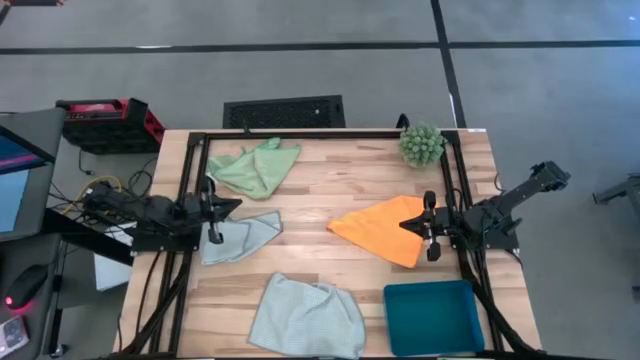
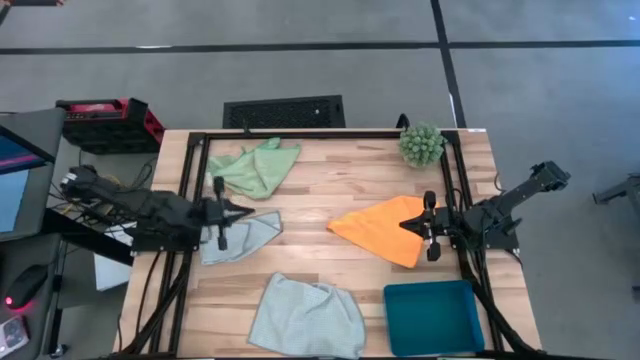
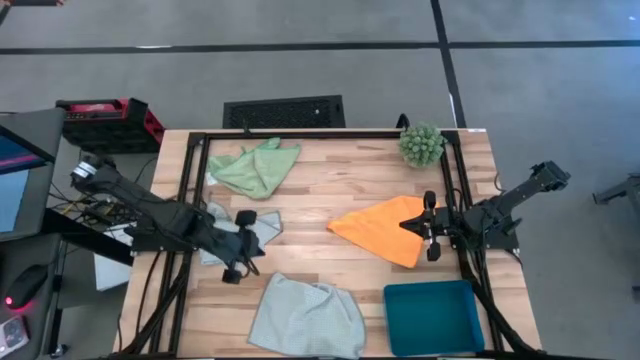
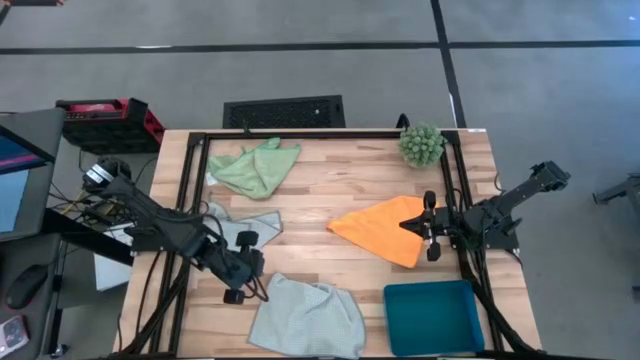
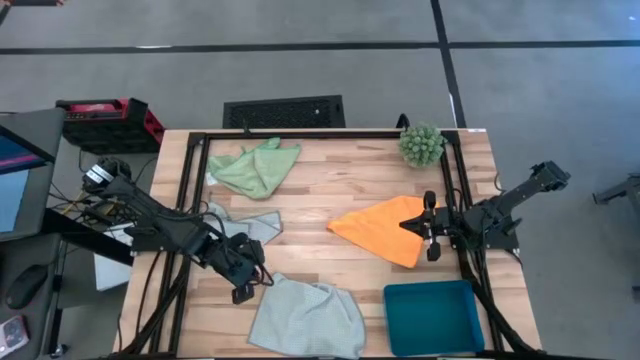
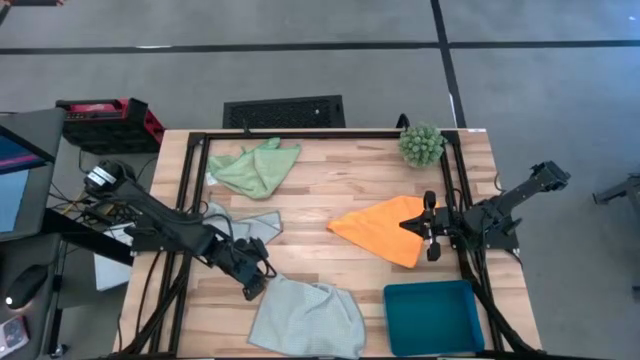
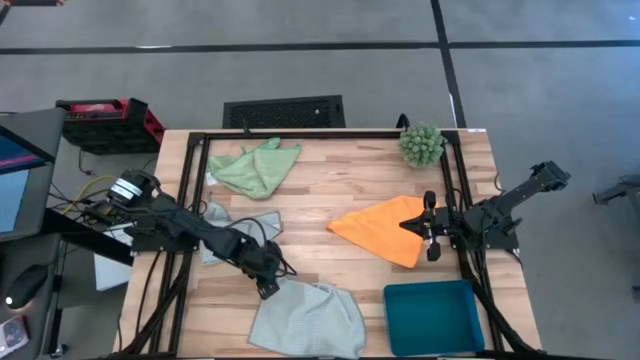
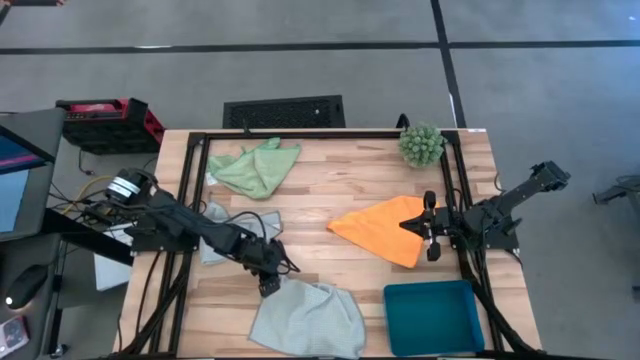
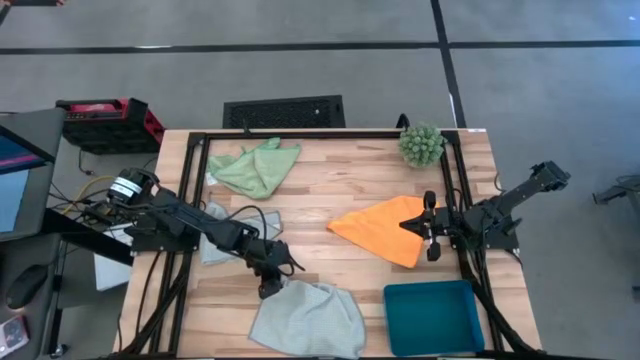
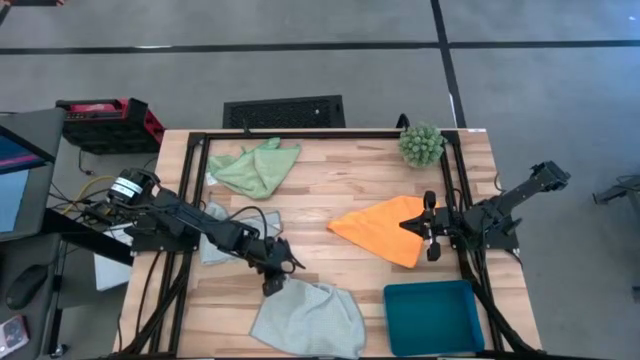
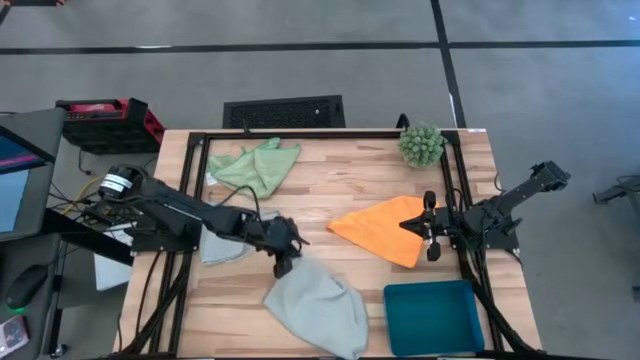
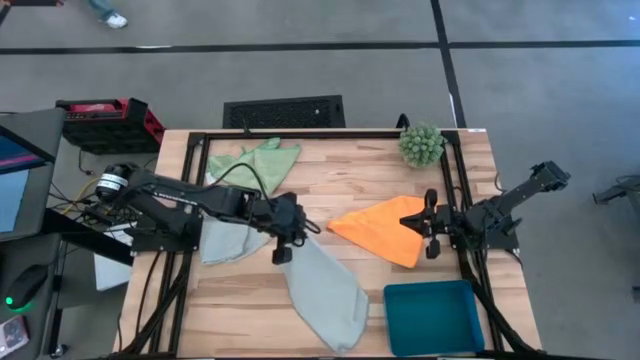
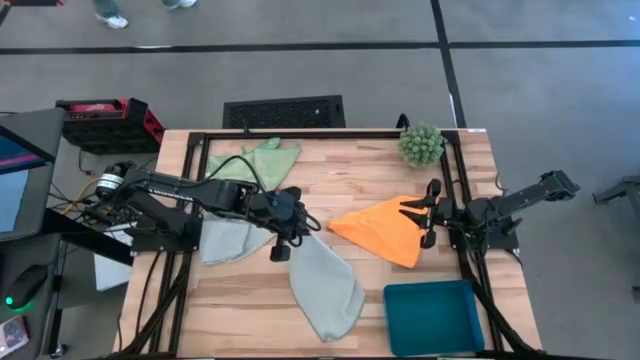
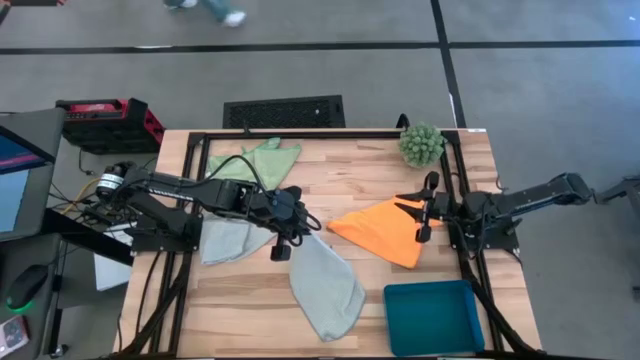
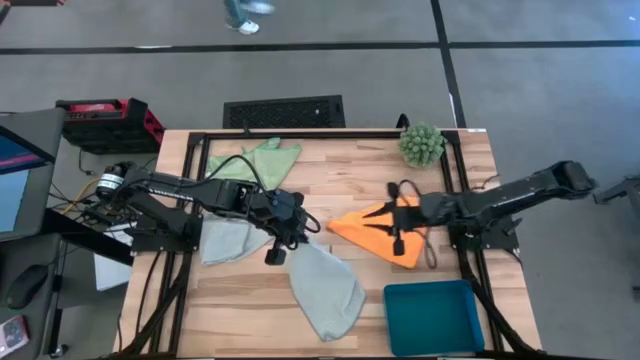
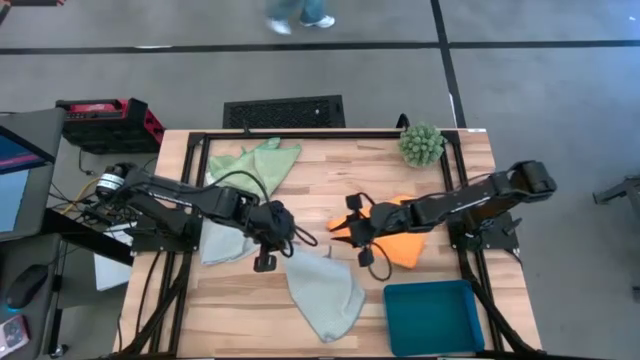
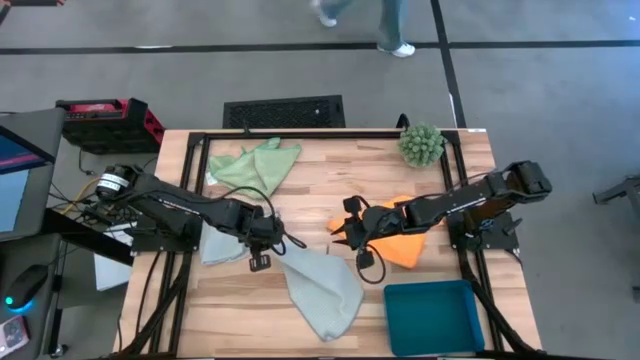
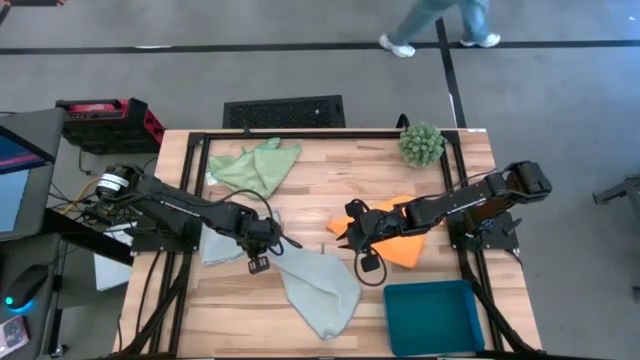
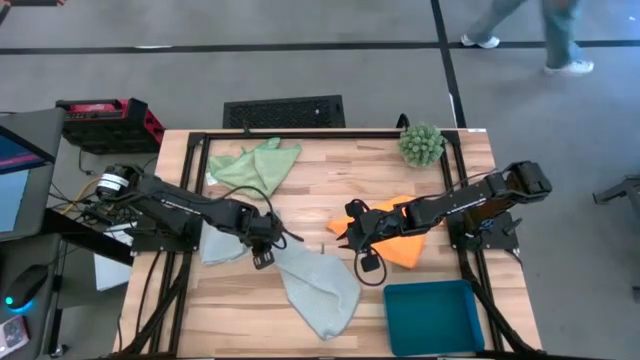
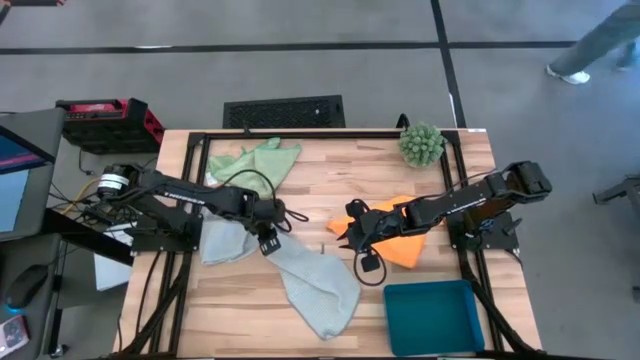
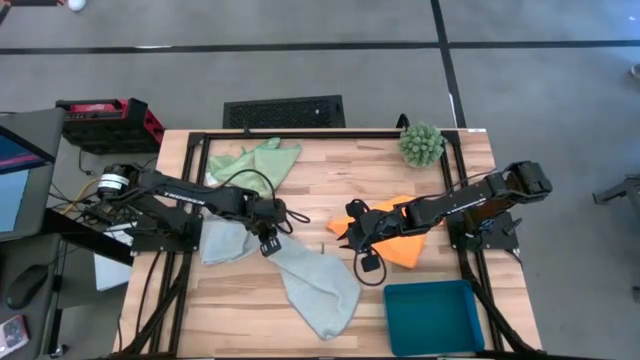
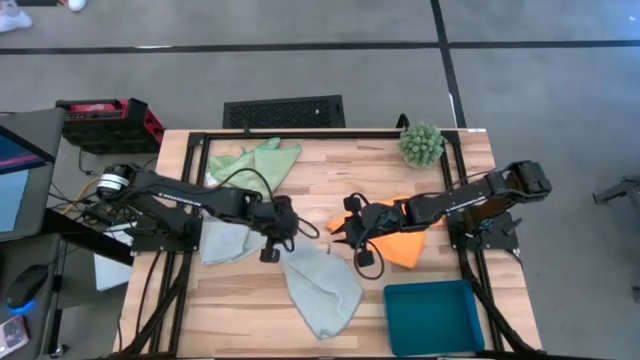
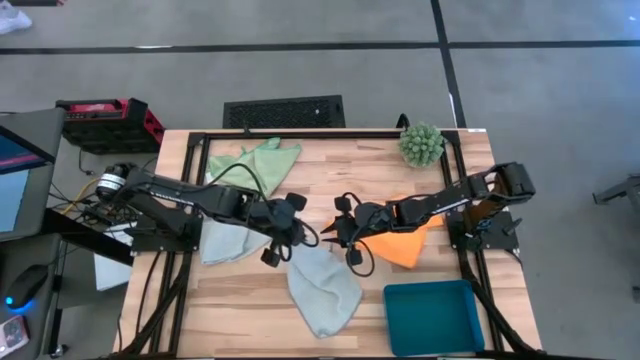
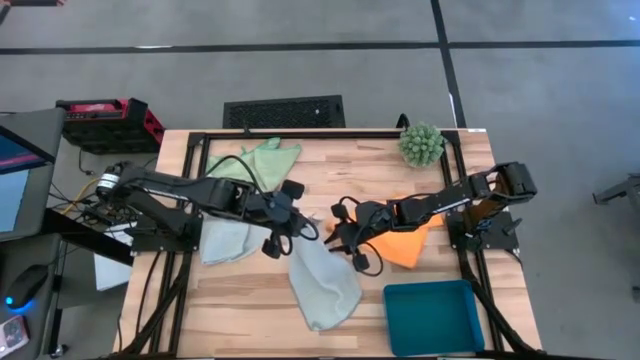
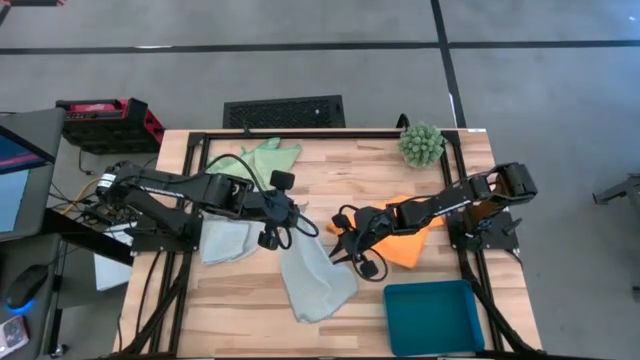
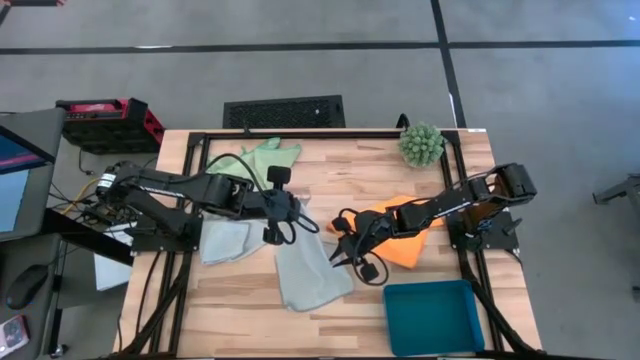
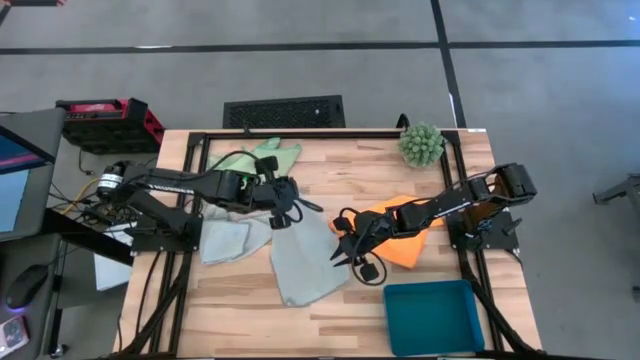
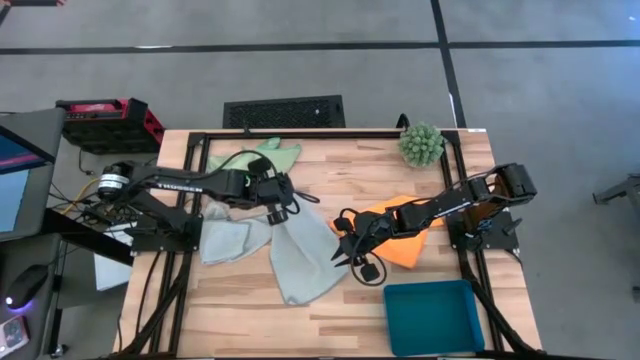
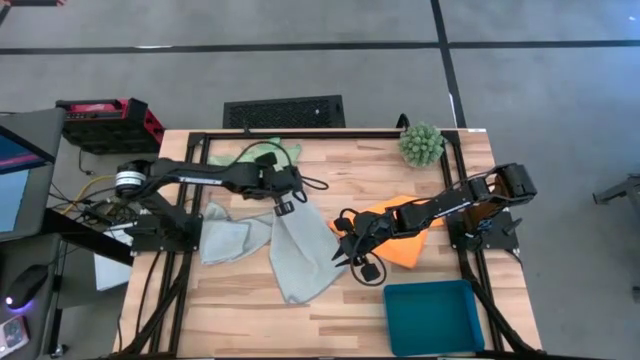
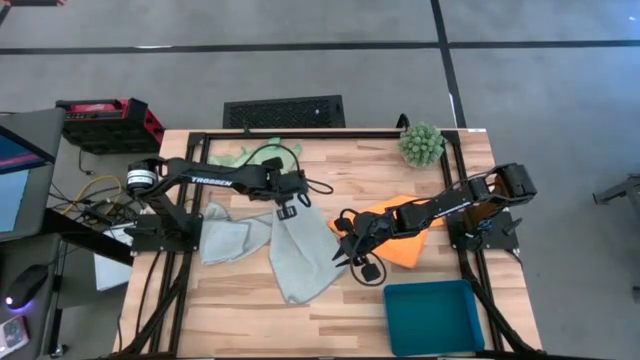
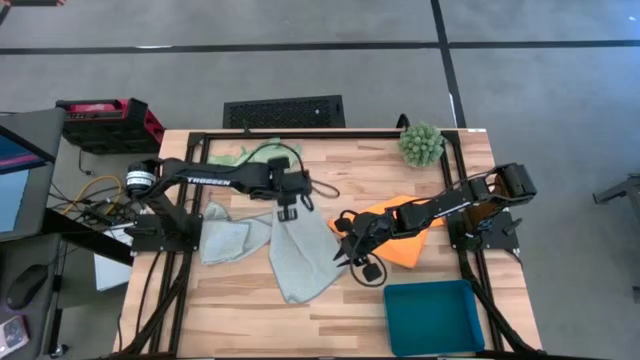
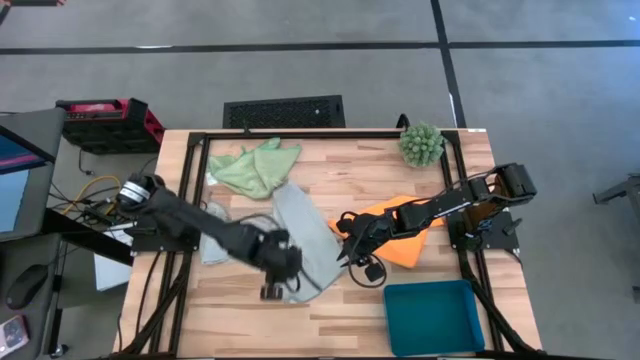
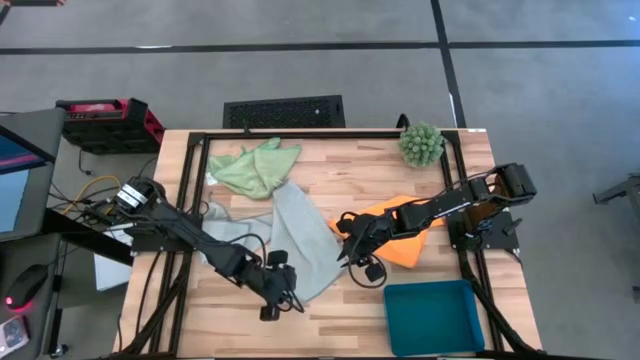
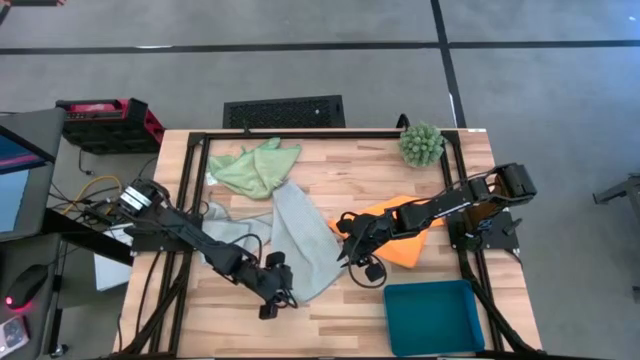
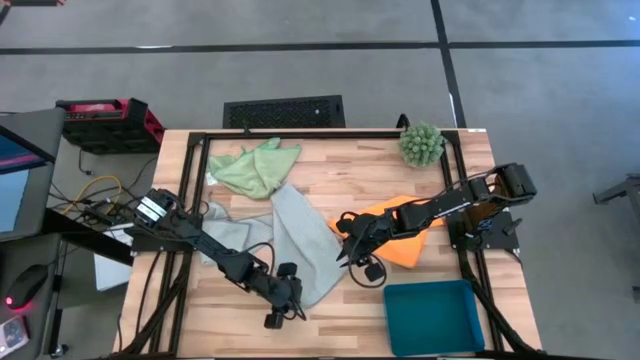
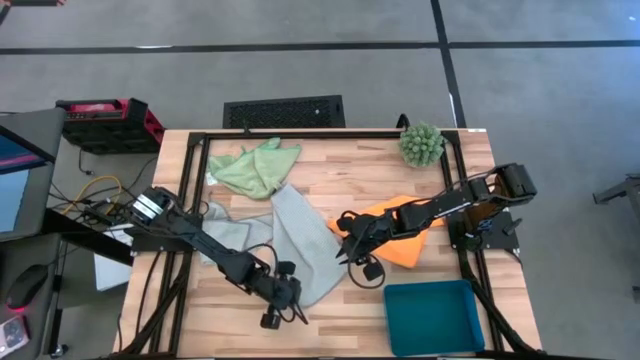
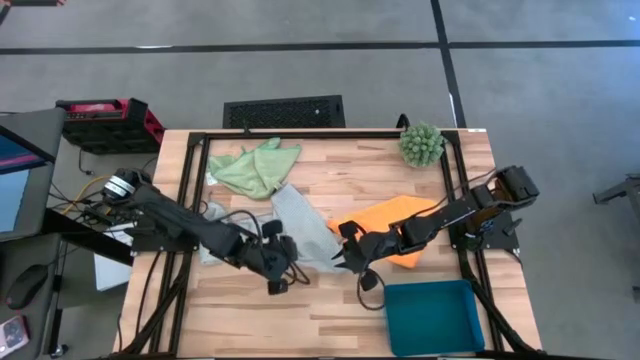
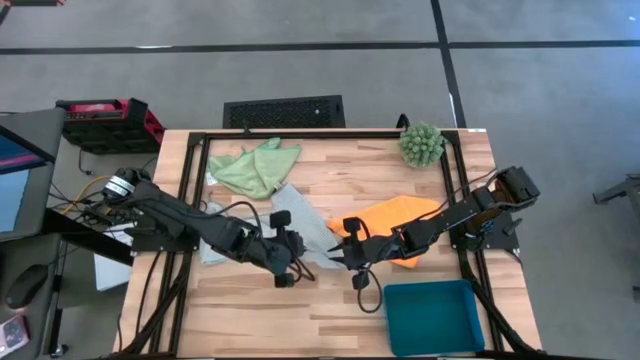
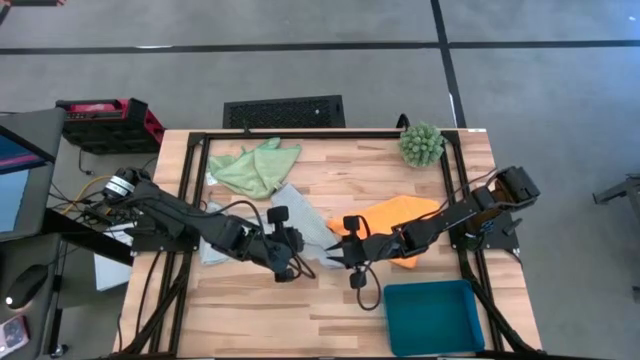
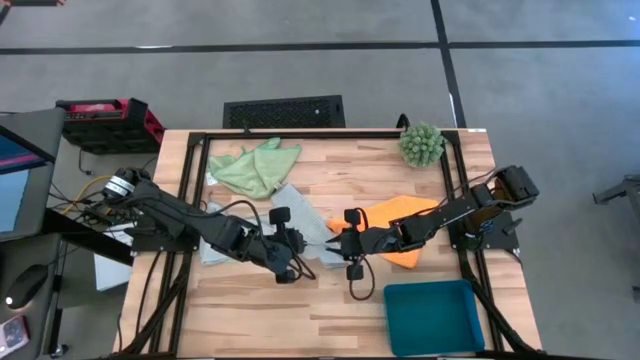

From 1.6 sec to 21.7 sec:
Task: Fold microfiber towels
Fold the bottom gray towel
